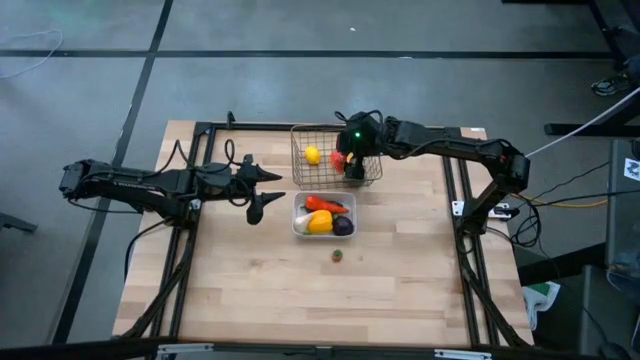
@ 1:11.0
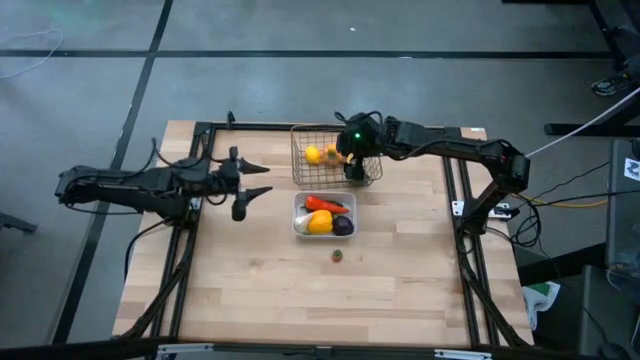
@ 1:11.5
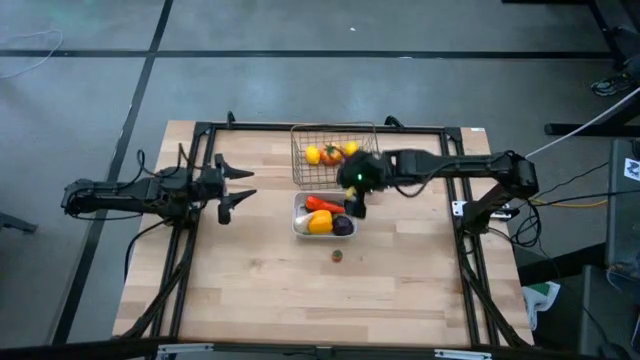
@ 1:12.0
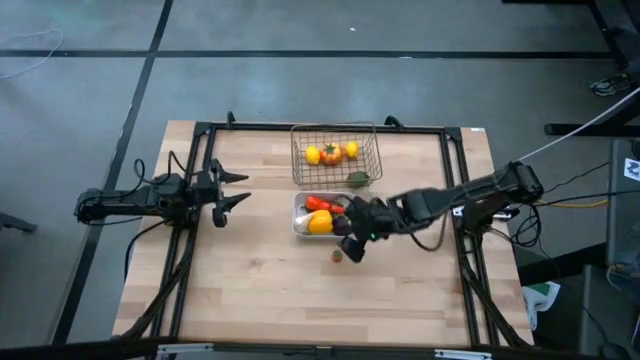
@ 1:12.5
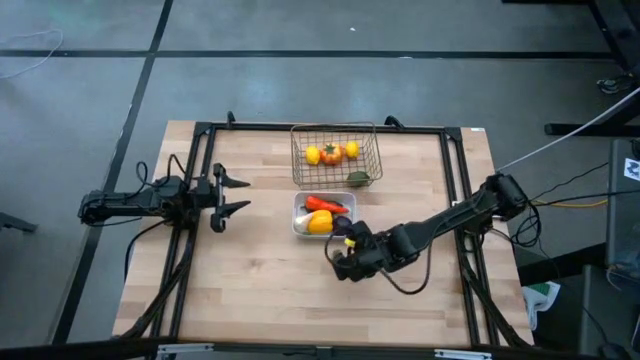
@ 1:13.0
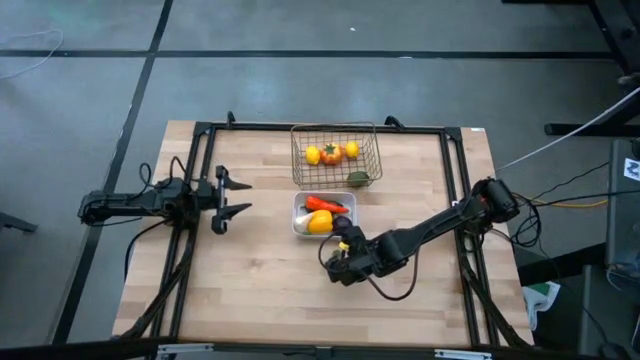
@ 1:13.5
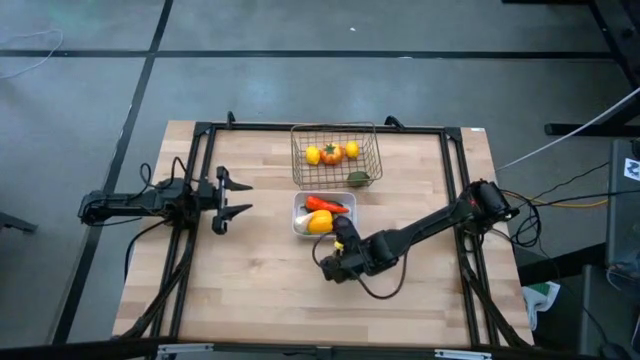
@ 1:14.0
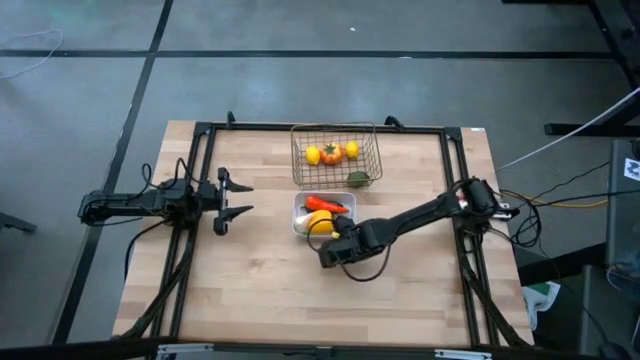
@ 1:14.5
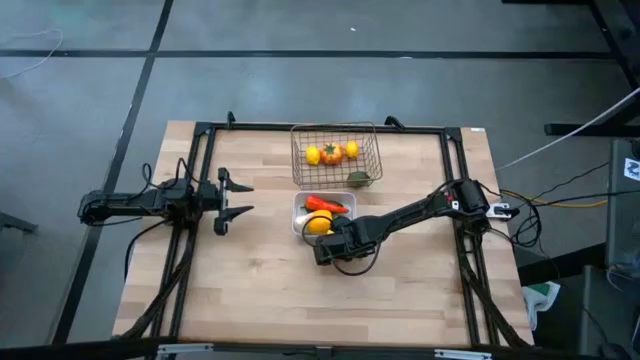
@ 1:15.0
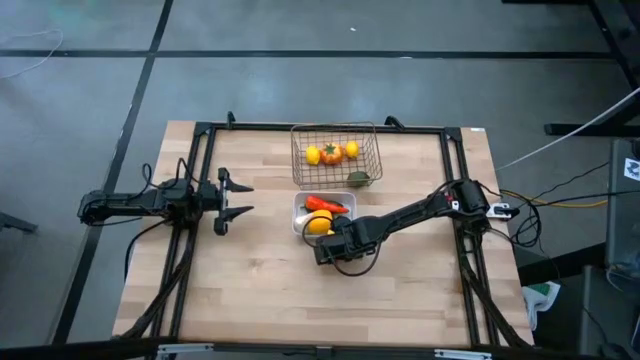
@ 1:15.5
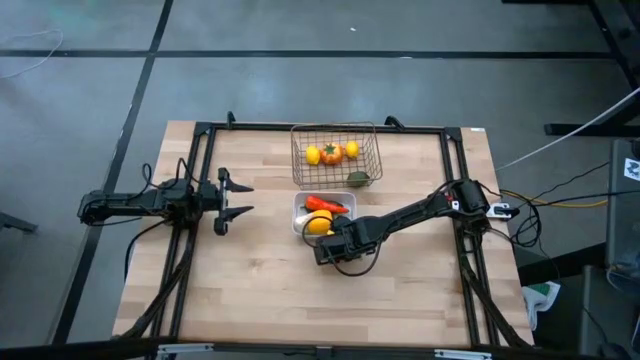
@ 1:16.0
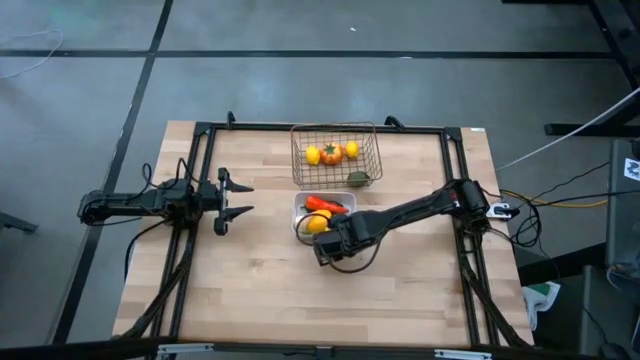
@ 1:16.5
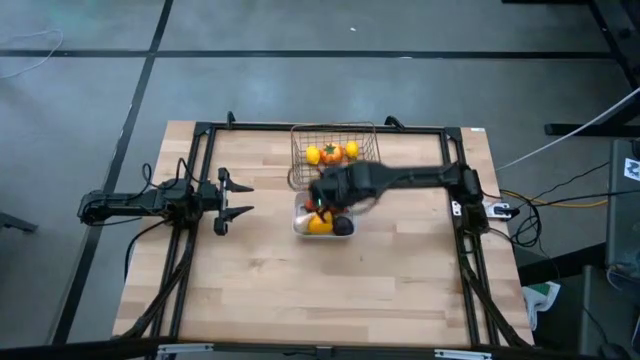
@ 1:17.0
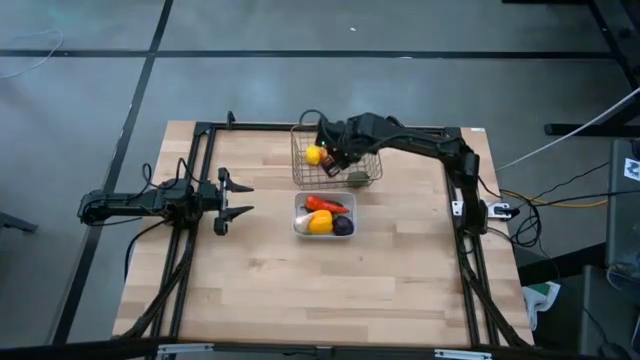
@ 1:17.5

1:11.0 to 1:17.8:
Task: Sort produce into baskets
Put the orange strawberry into the black wire basket

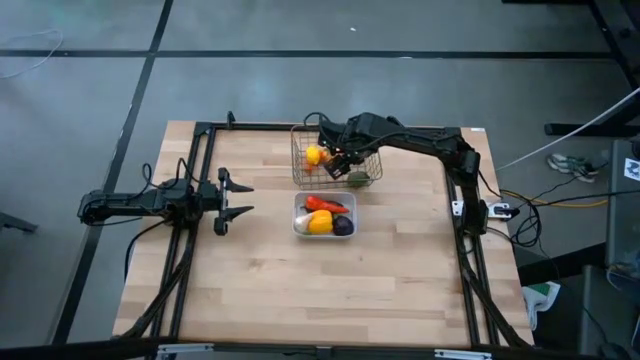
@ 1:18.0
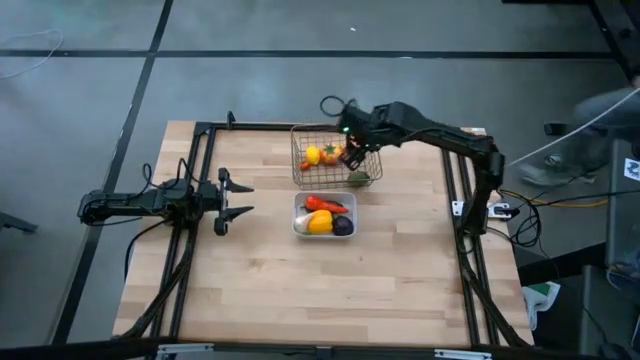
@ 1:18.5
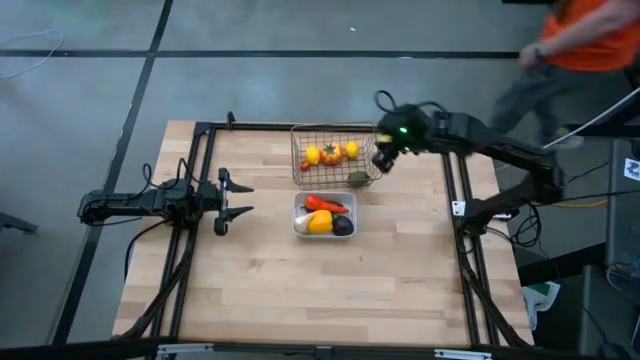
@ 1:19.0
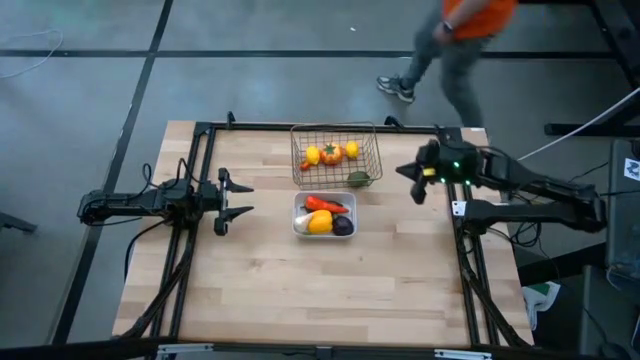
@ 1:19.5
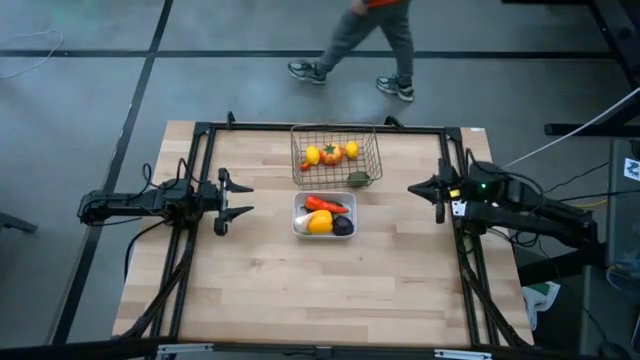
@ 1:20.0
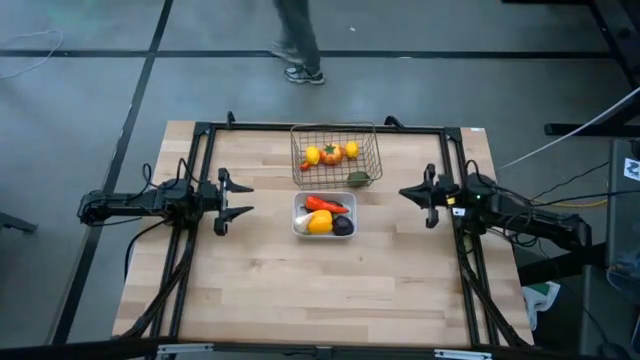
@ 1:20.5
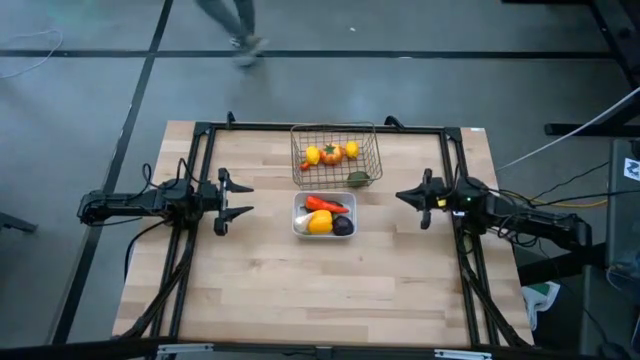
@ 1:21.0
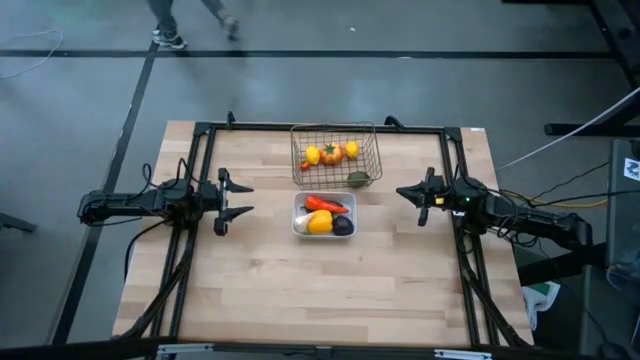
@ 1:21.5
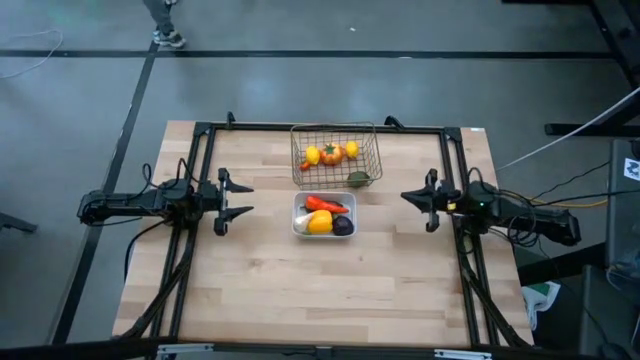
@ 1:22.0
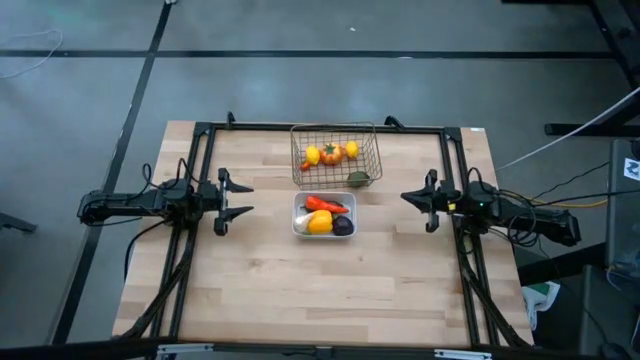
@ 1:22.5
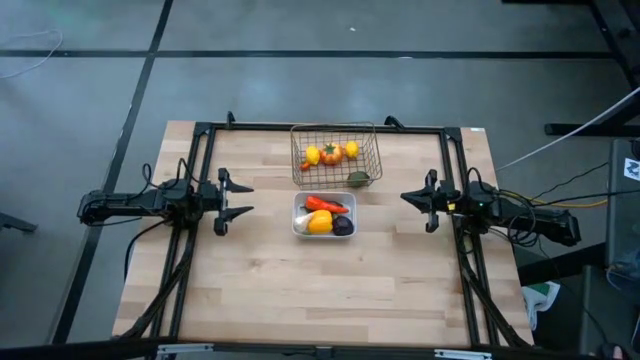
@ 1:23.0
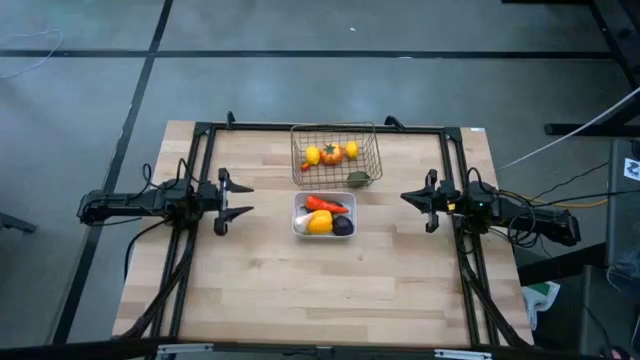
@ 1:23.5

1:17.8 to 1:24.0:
Return to Home Position

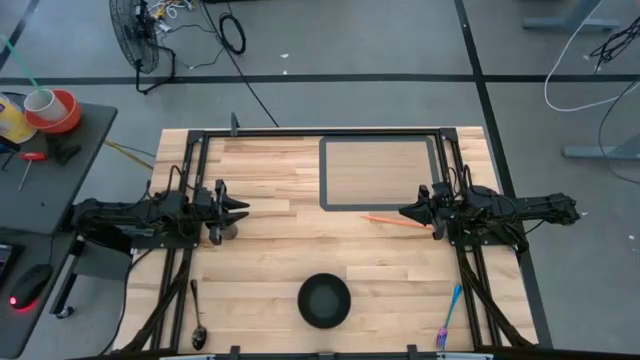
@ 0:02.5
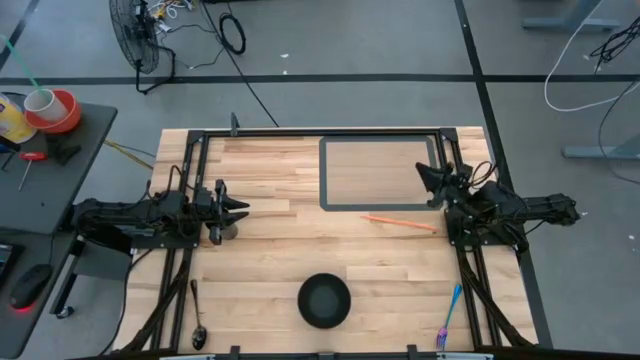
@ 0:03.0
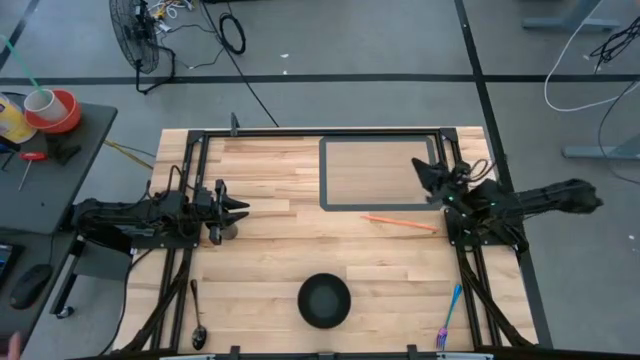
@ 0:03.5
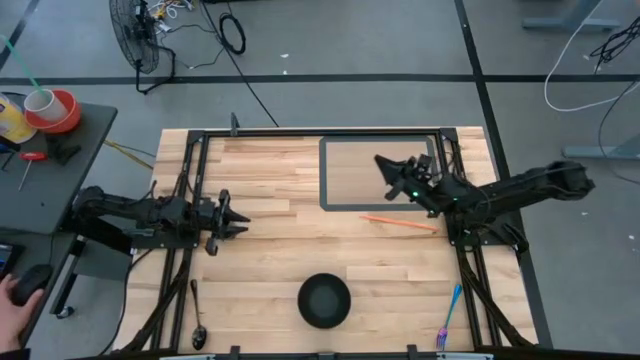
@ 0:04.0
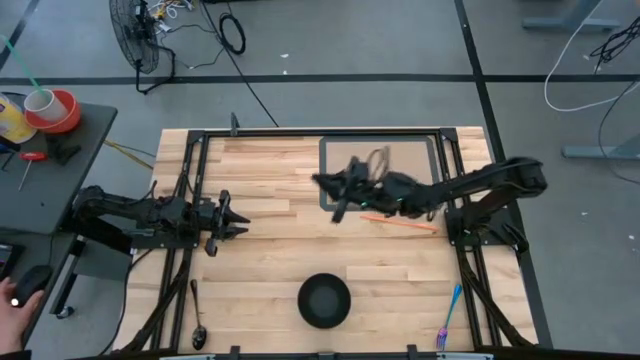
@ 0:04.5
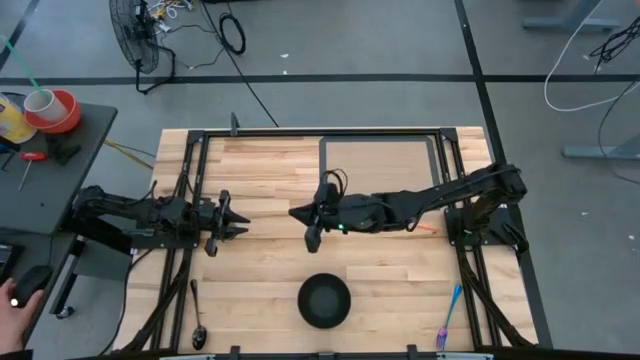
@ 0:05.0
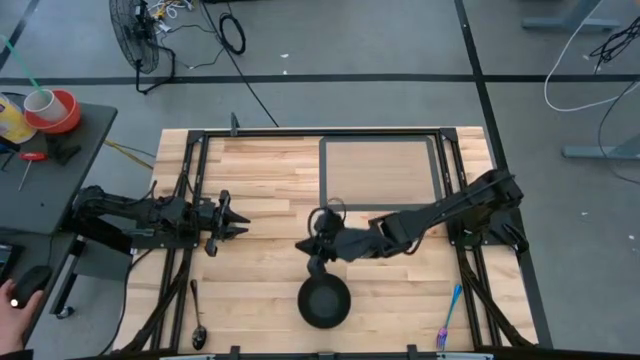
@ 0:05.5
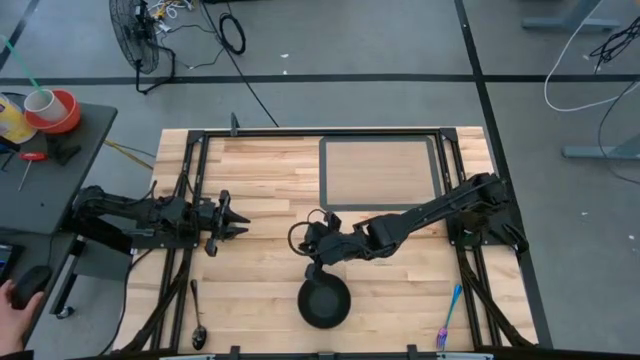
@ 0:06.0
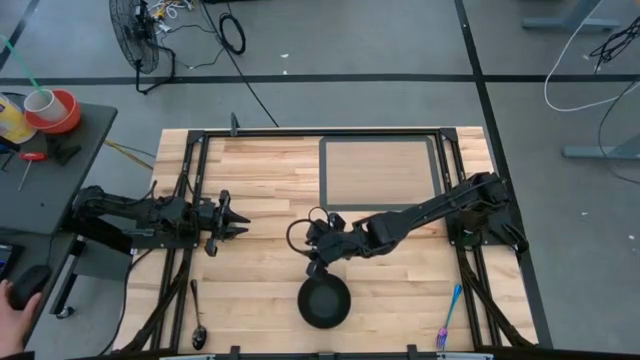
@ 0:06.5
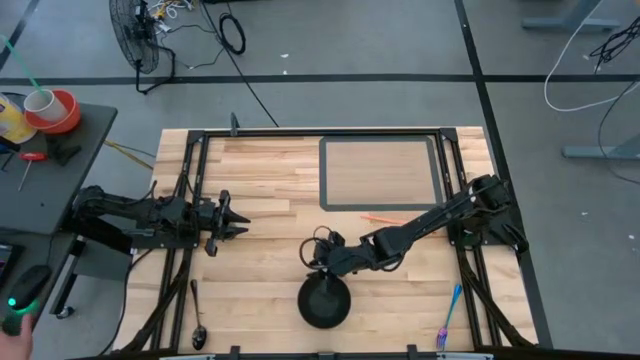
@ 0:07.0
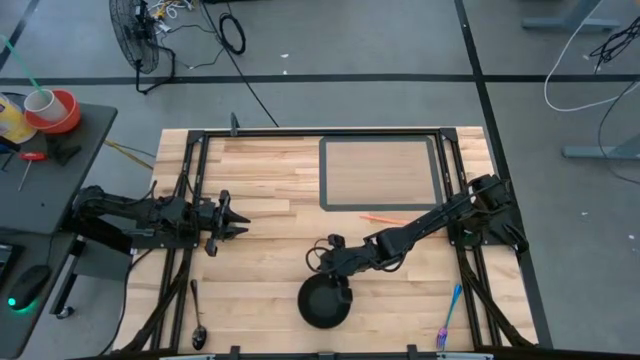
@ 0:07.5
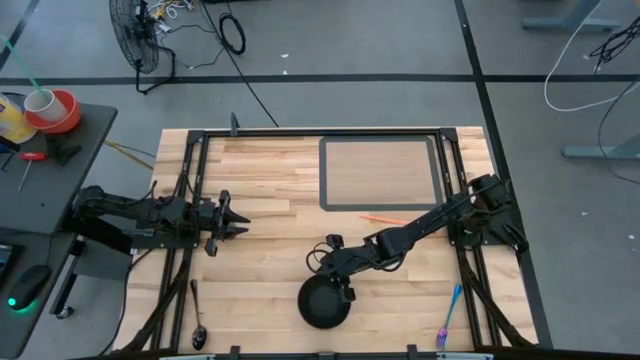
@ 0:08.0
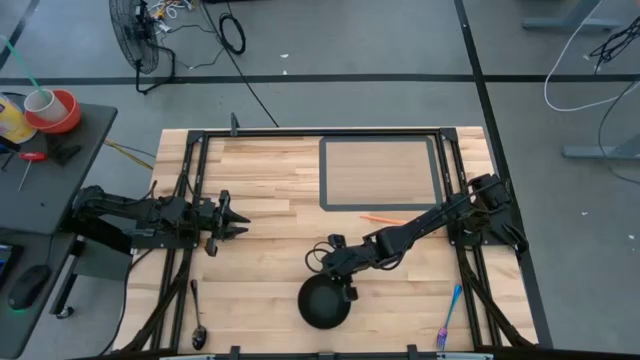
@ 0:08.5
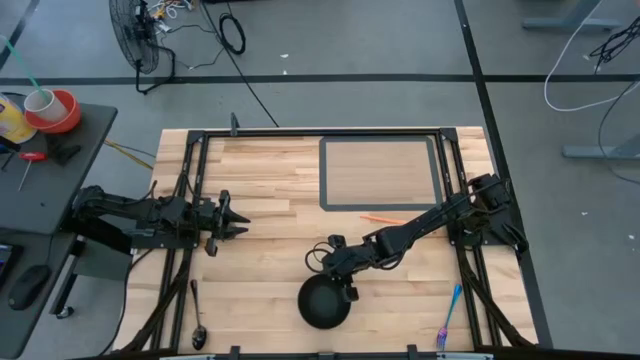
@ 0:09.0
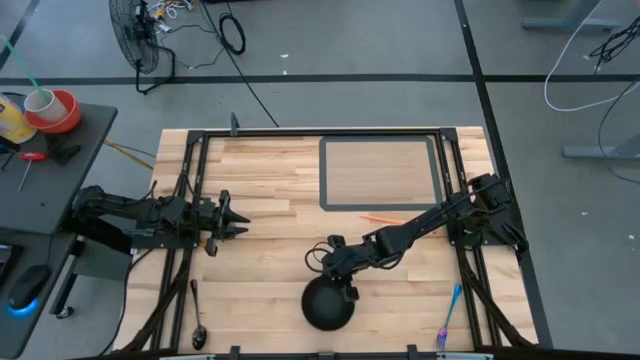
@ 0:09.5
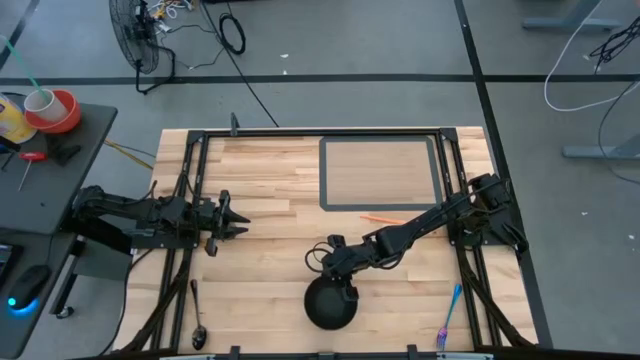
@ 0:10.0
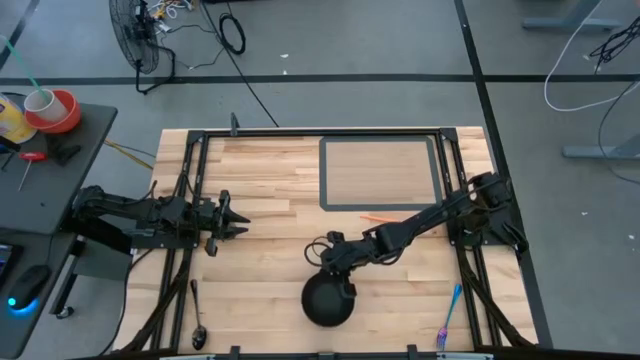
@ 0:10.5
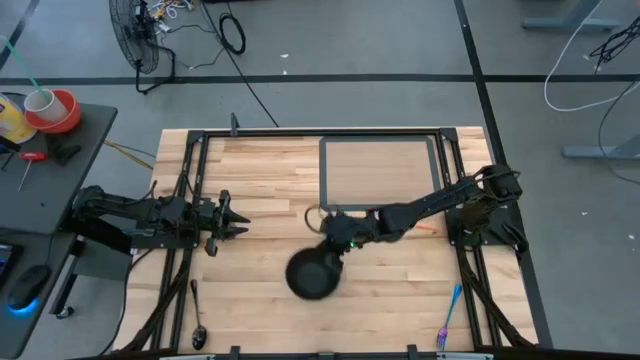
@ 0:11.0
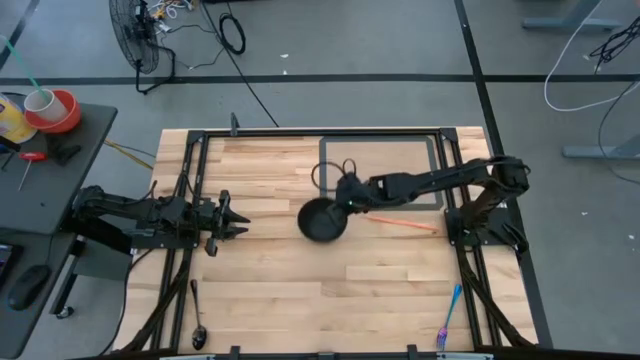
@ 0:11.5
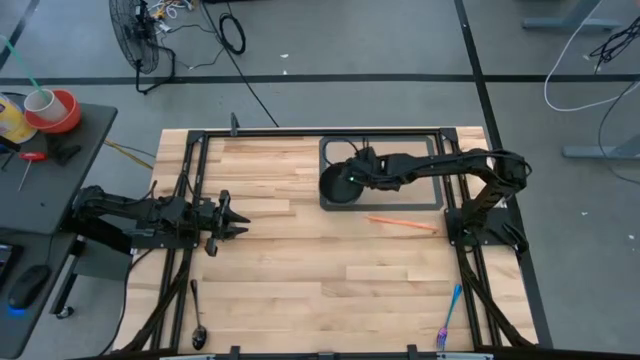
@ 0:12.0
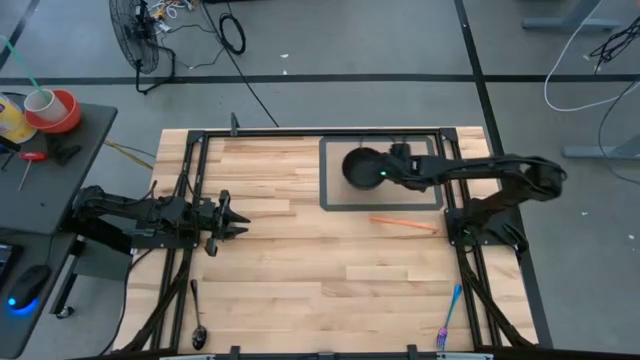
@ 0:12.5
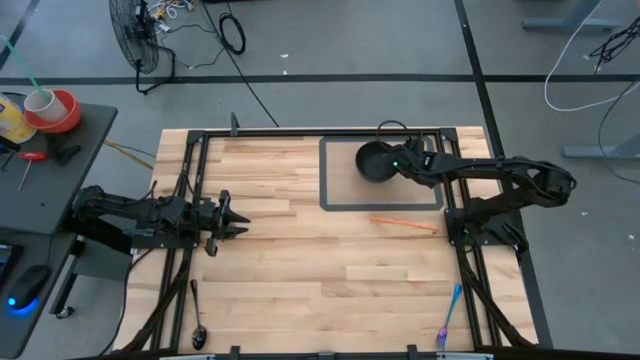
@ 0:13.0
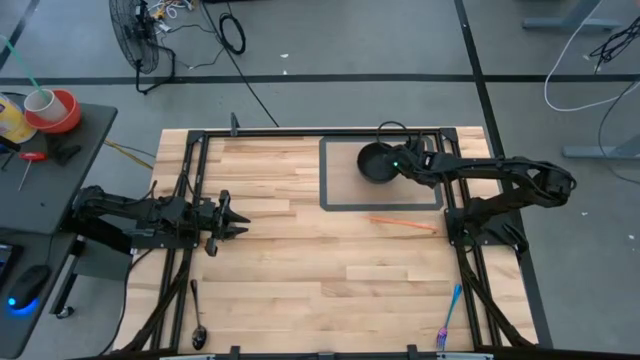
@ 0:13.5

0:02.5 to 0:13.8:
Task: Pick & Place Utensil
Put the black bowl on the brown mat
